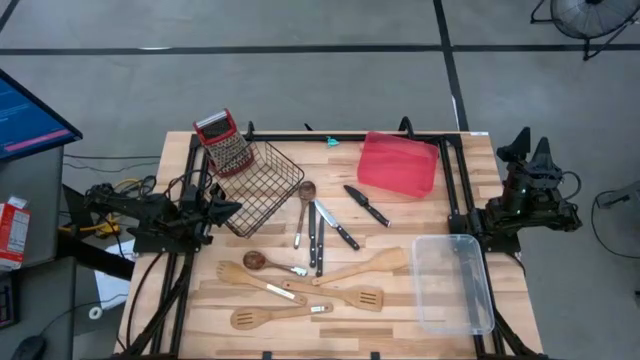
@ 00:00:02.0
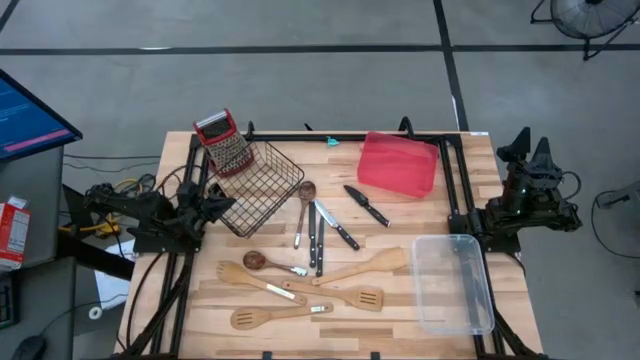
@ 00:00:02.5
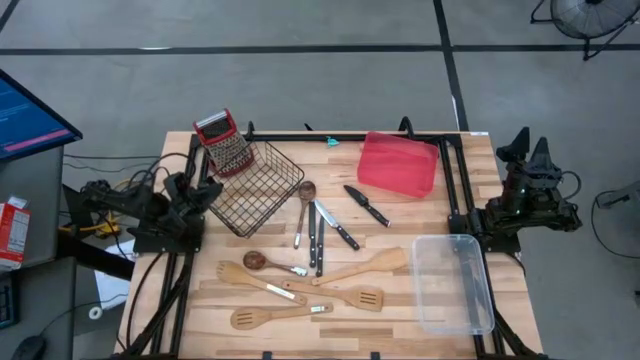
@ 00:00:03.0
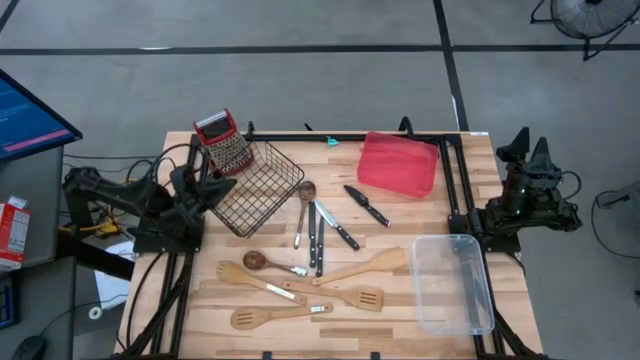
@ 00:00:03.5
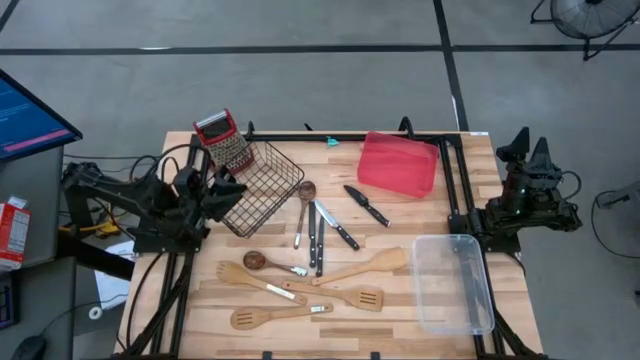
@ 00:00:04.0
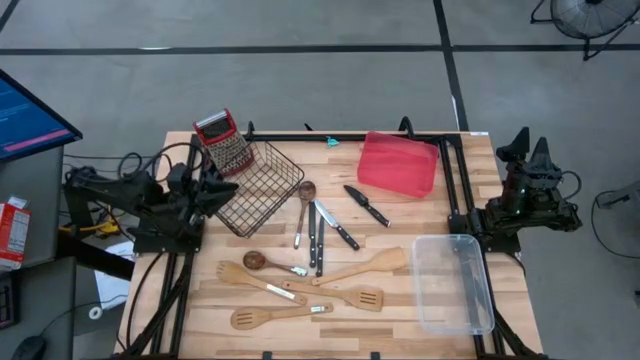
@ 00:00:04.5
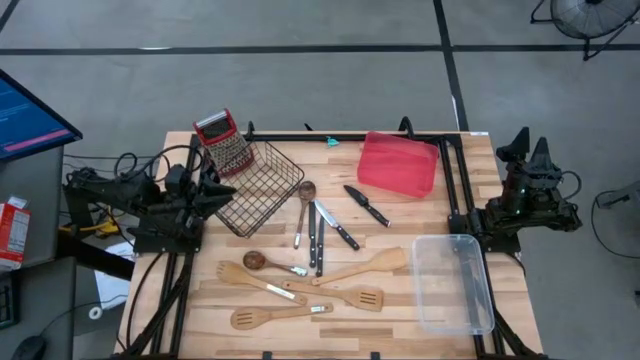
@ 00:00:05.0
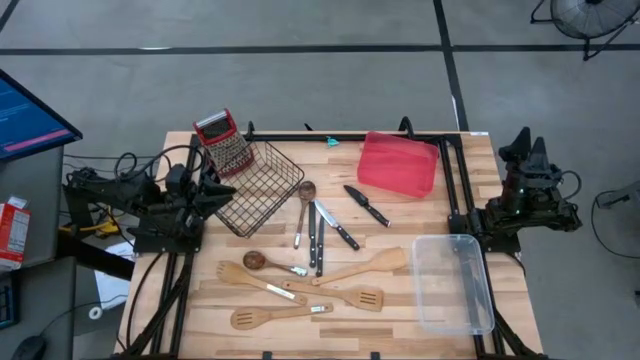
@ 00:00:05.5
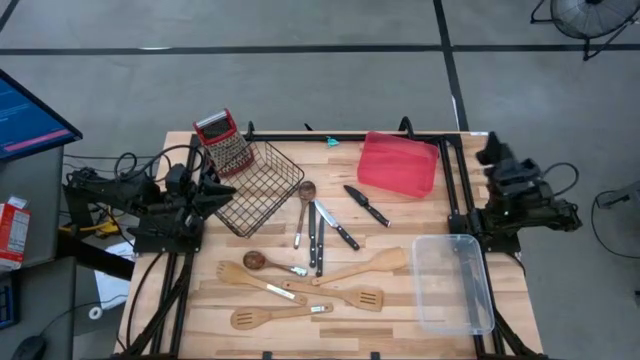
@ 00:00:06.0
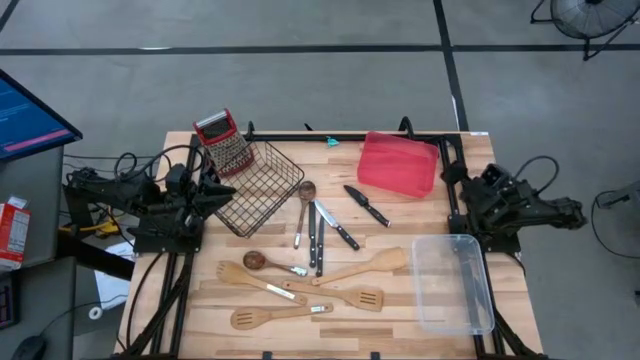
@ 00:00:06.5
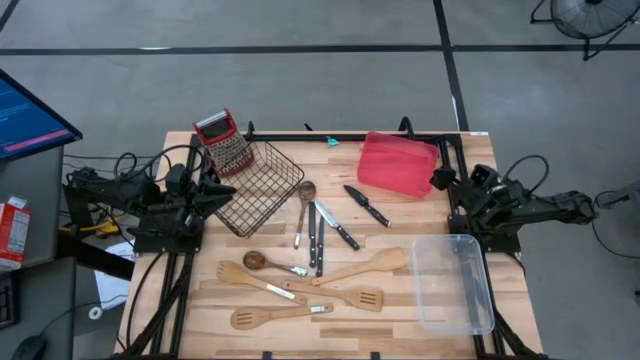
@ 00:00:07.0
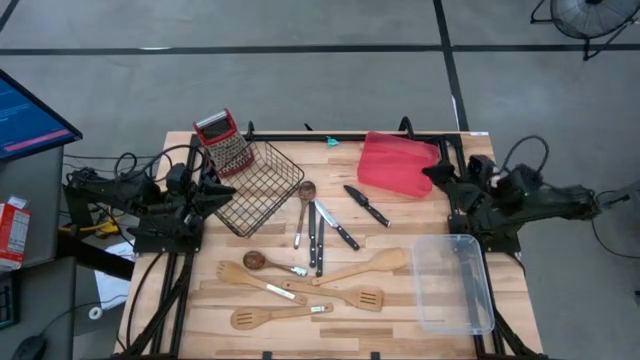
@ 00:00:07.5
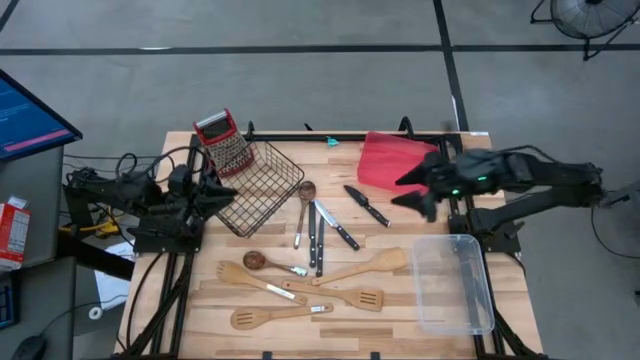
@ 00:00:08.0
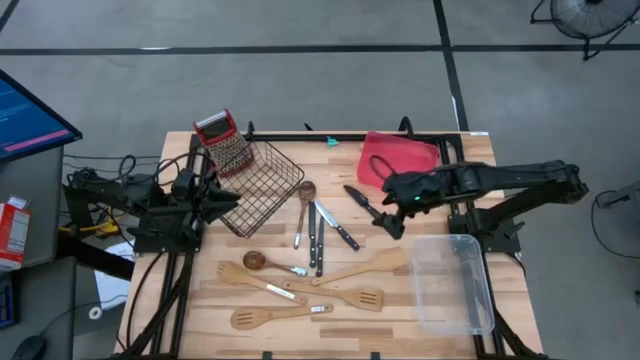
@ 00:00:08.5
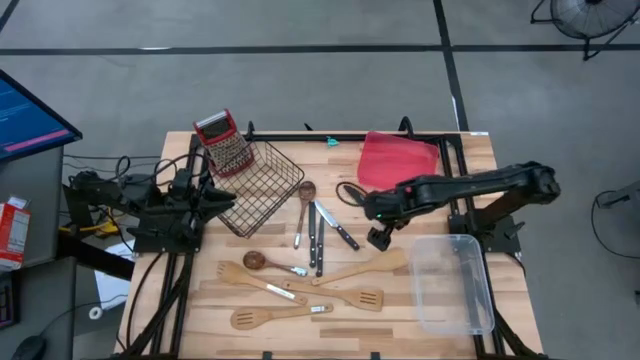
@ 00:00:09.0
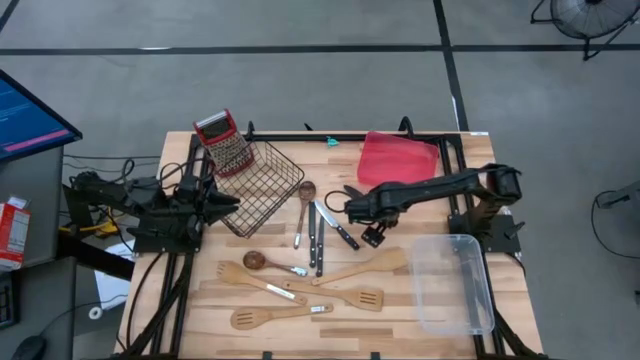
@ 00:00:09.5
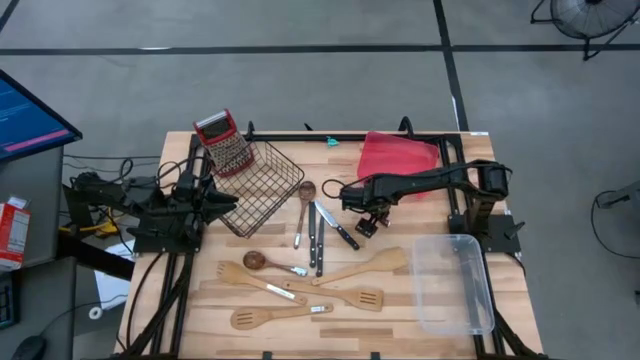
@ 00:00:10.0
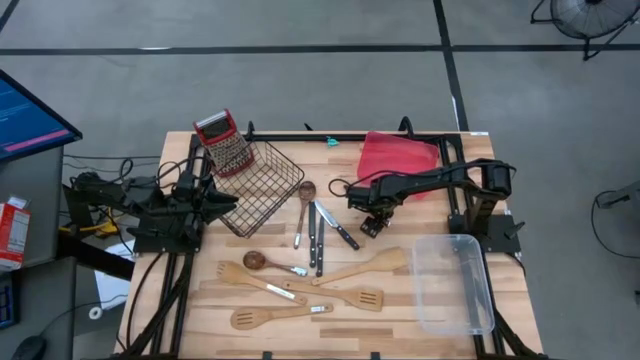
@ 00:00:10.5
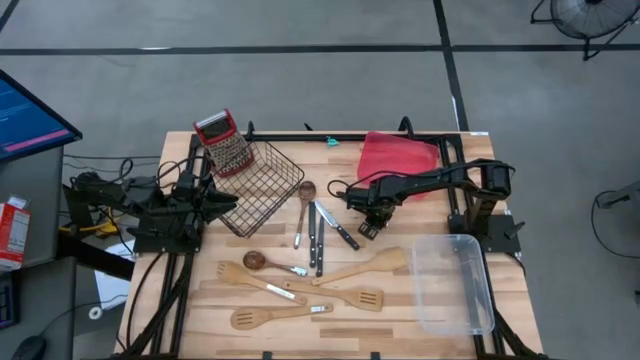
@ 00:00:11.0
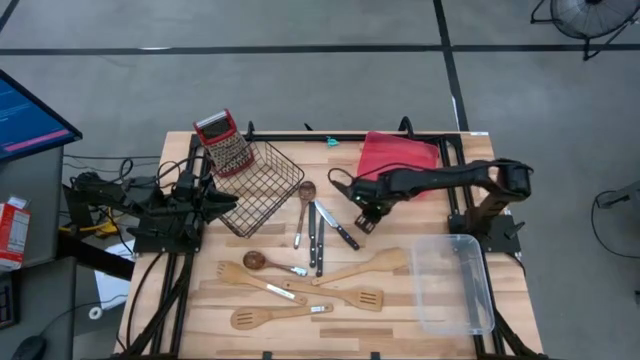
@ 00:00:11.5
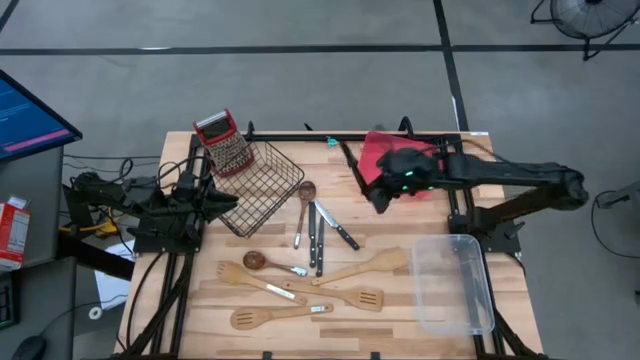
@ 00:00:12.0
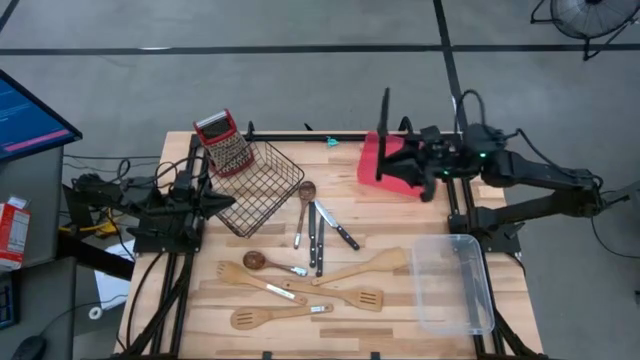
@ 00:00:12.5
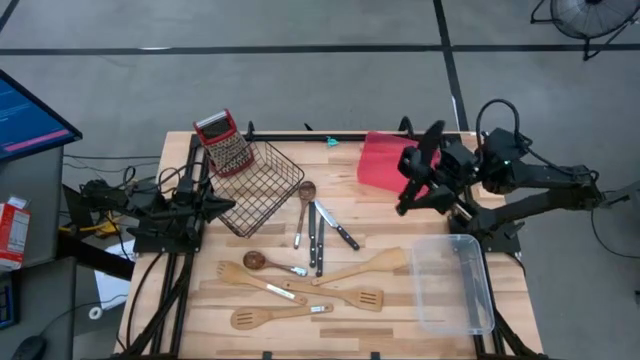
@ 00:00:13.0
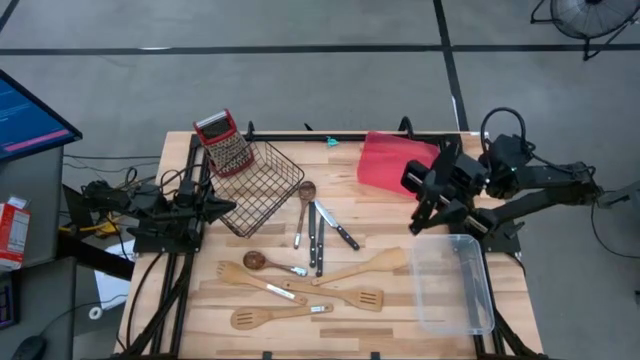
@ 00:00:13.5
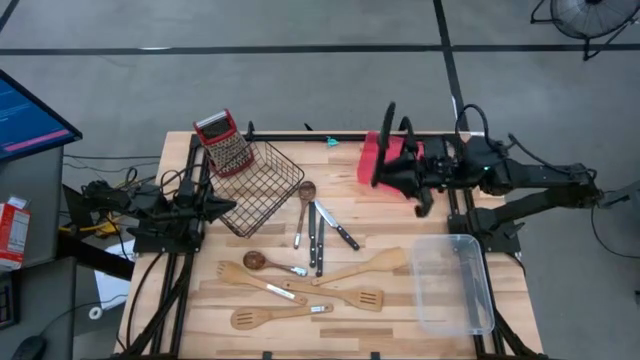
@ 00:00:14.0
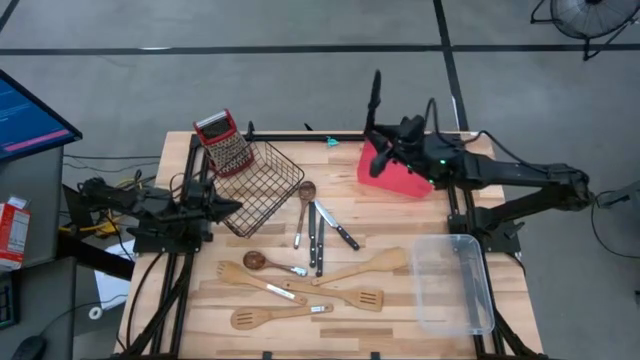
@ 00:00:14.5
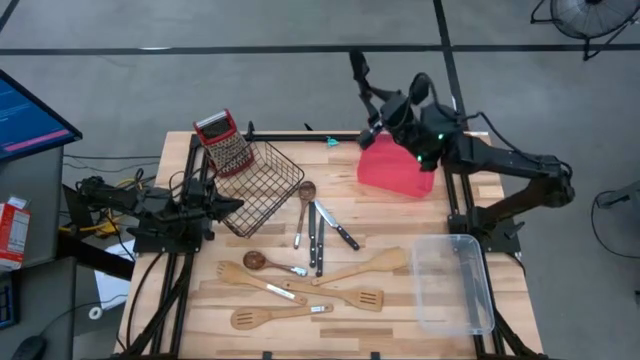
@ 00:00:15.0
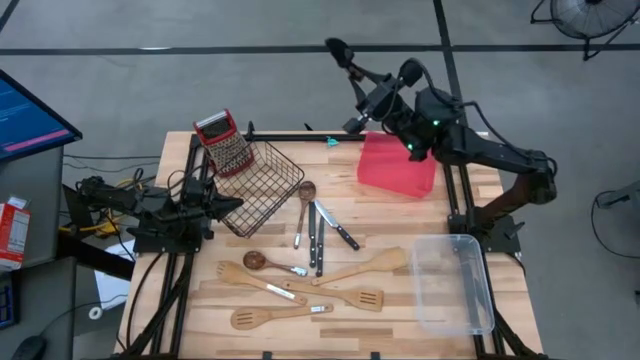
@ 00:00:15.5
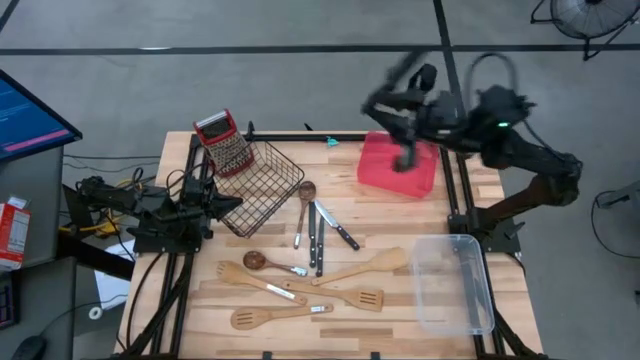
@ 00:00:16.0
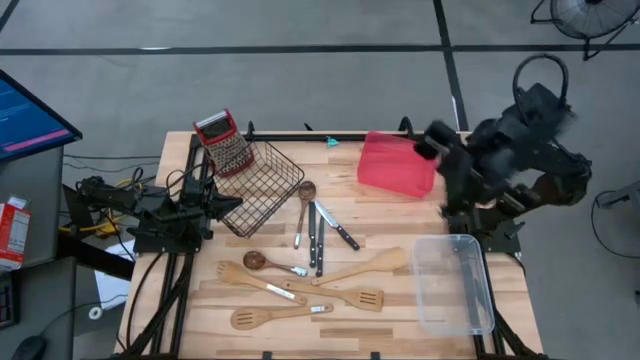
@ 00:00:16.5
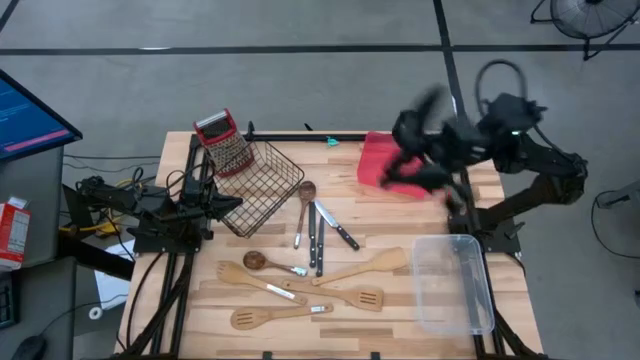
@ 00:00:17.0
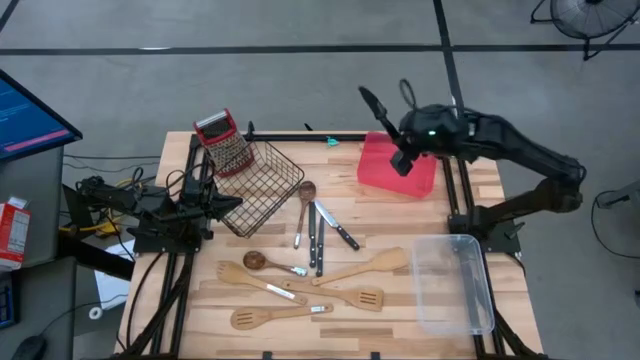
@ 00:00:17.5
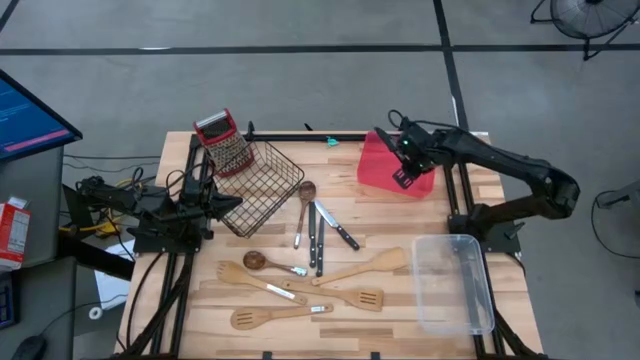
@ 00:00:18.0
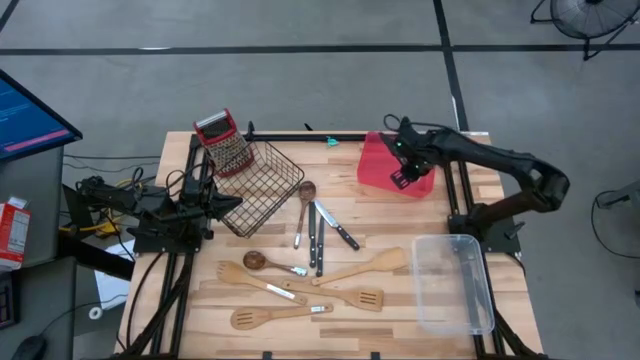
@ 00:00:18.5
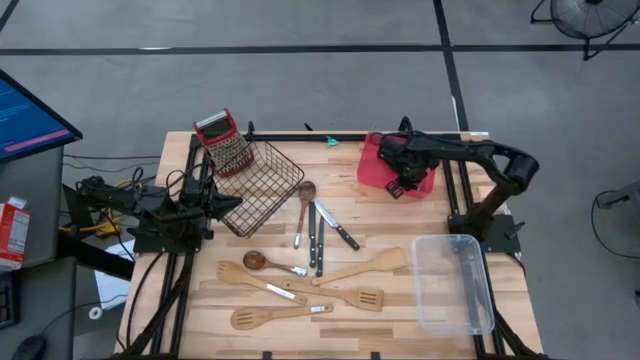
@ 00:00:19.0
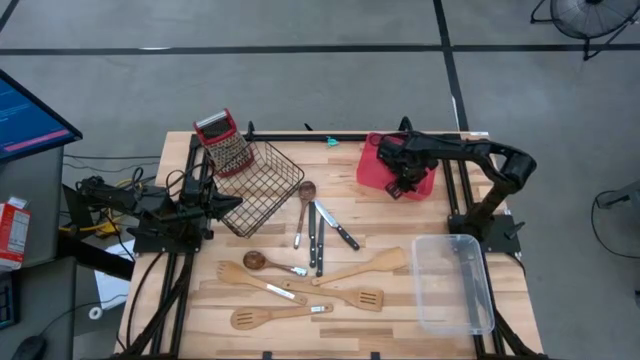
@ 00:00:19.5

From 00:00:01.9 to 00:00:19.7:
Task: Pick & Place Kitchen Items
Put the top black knife into the red bin
